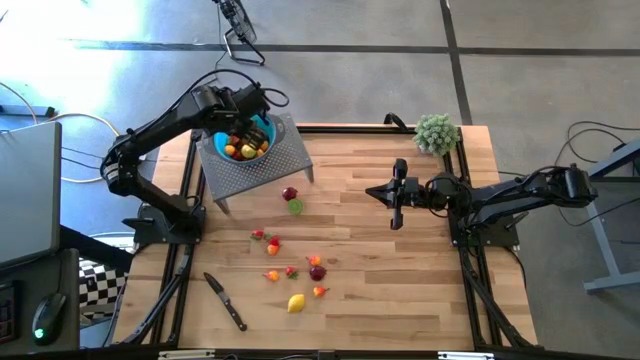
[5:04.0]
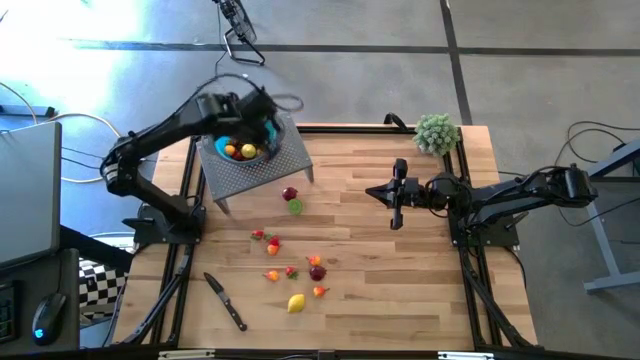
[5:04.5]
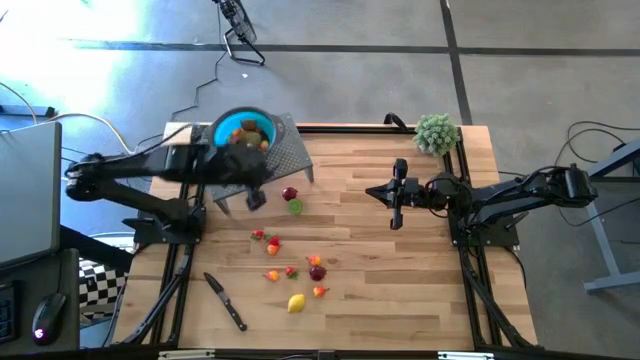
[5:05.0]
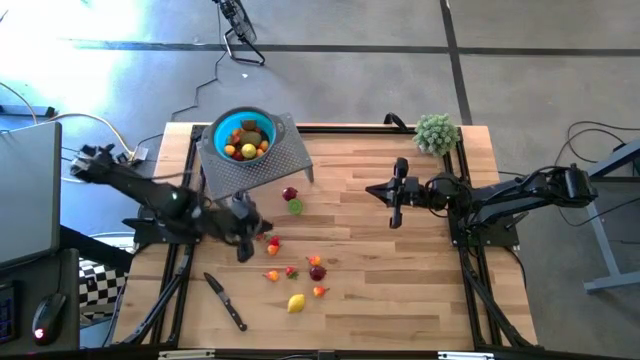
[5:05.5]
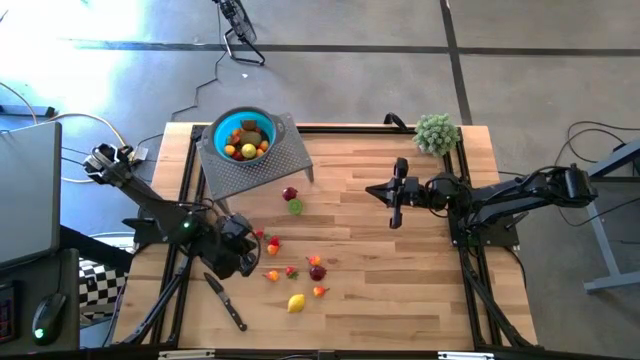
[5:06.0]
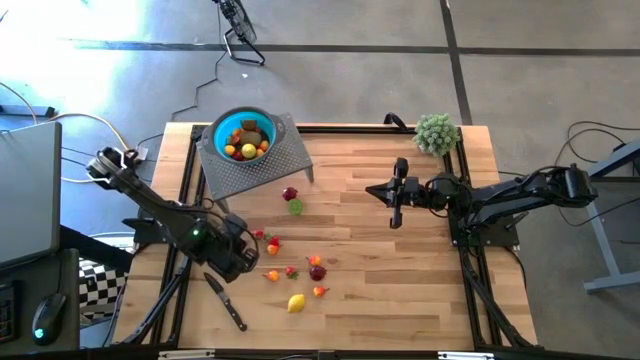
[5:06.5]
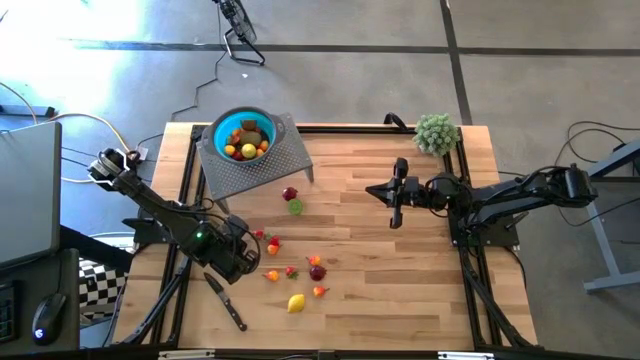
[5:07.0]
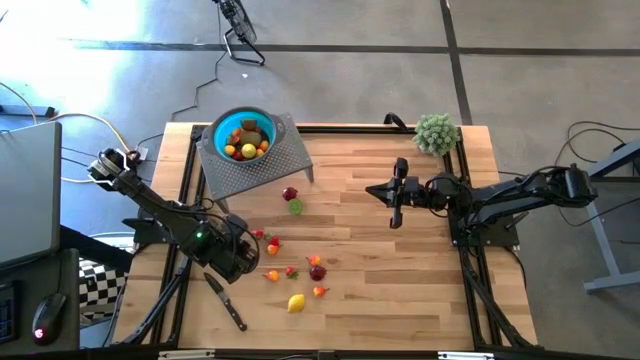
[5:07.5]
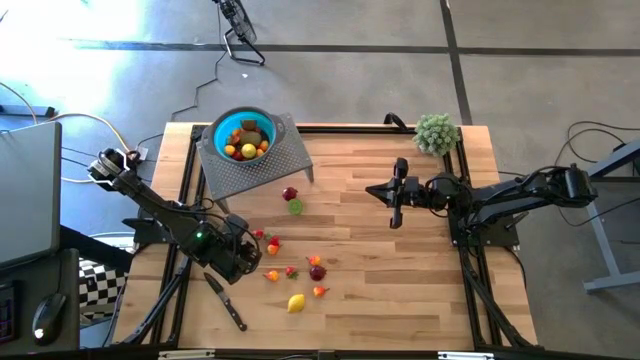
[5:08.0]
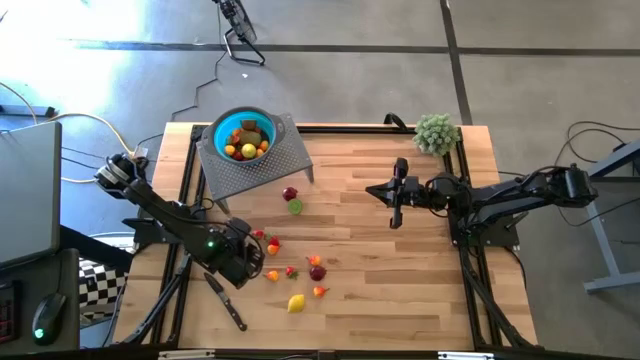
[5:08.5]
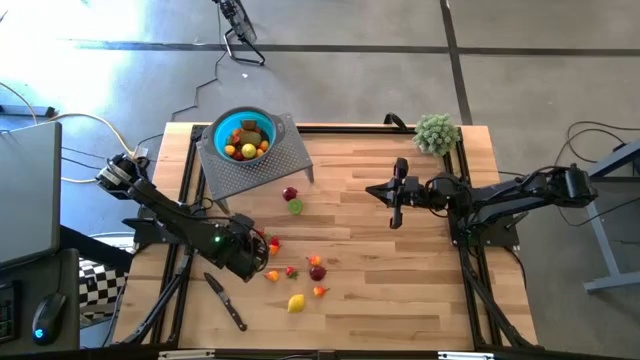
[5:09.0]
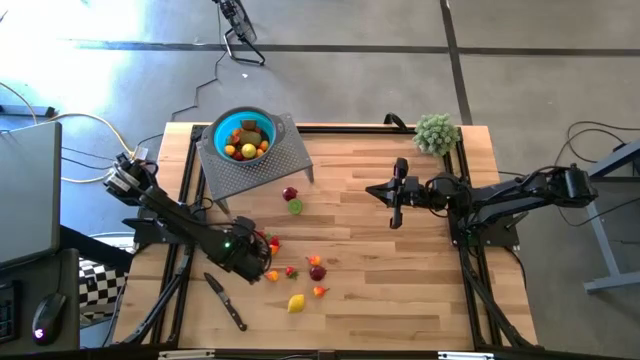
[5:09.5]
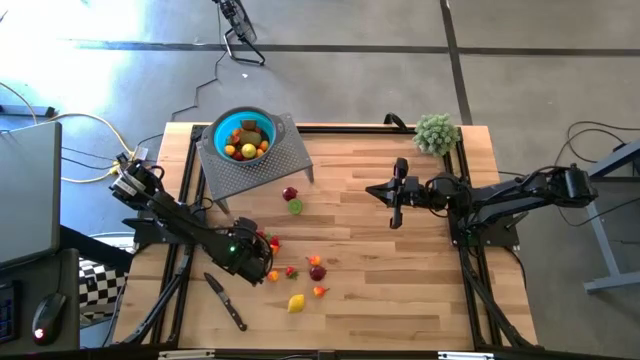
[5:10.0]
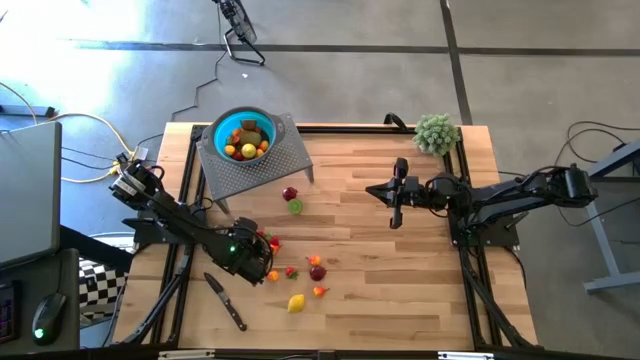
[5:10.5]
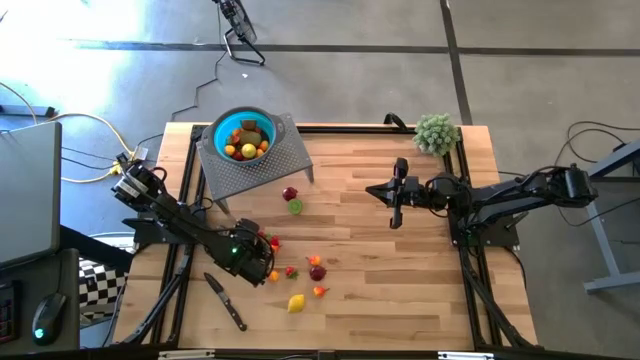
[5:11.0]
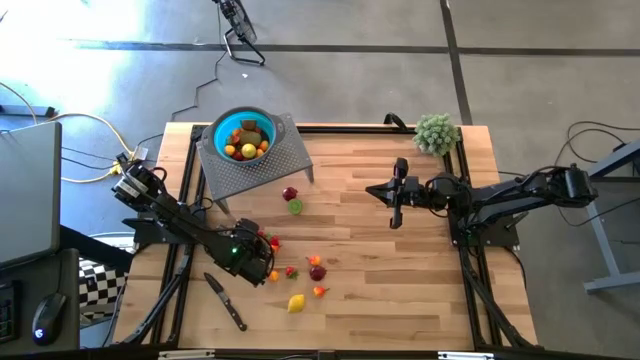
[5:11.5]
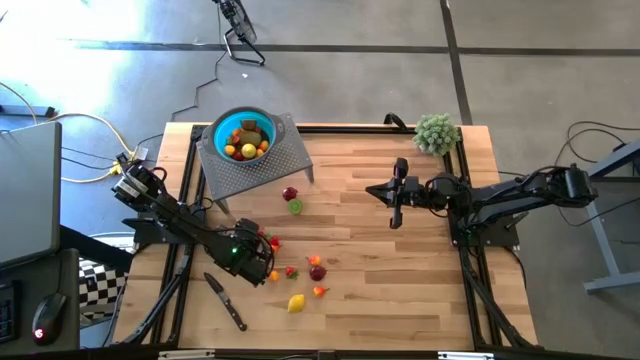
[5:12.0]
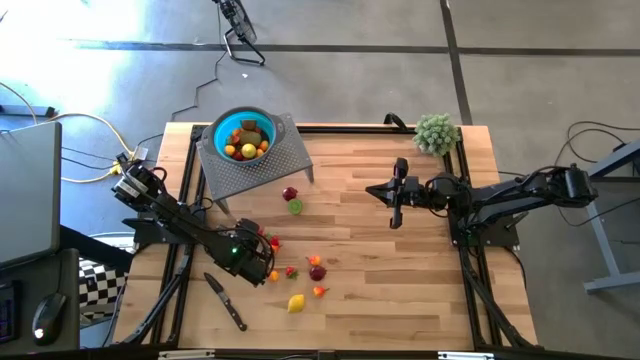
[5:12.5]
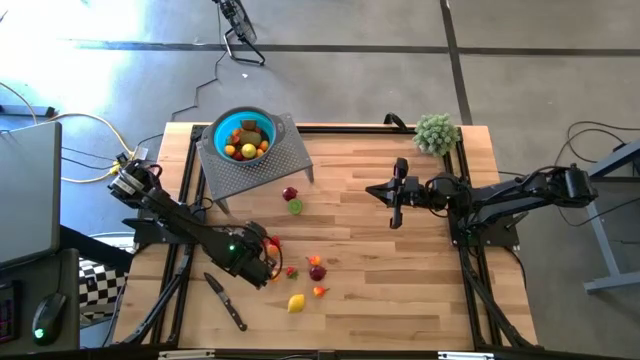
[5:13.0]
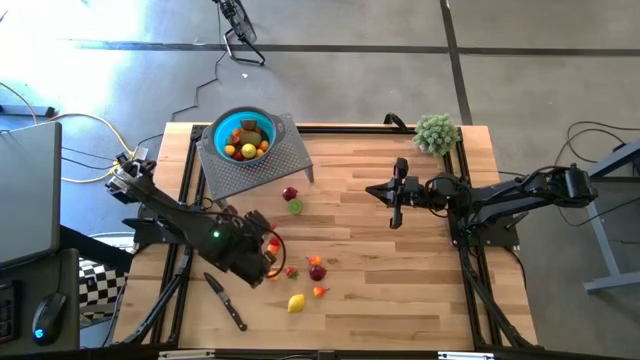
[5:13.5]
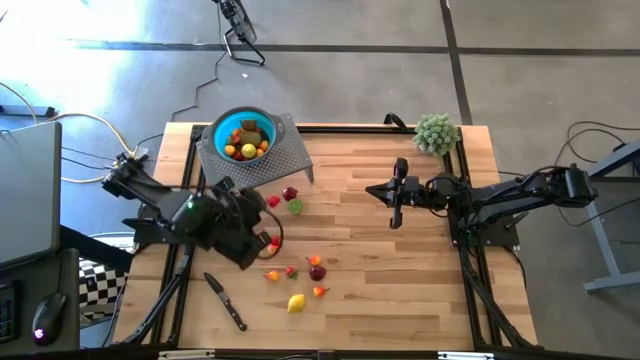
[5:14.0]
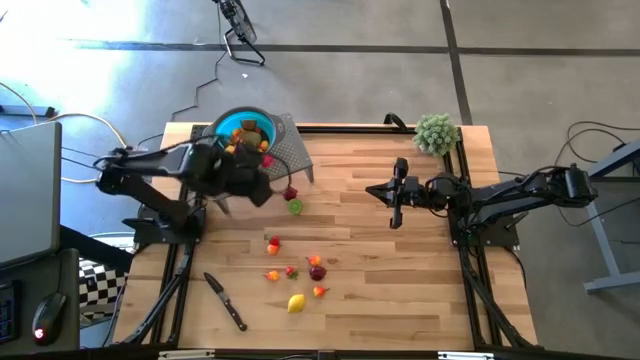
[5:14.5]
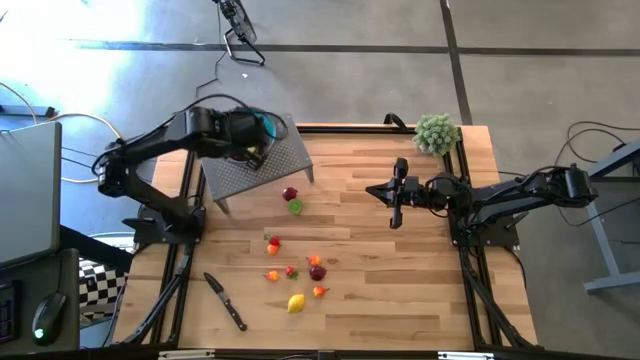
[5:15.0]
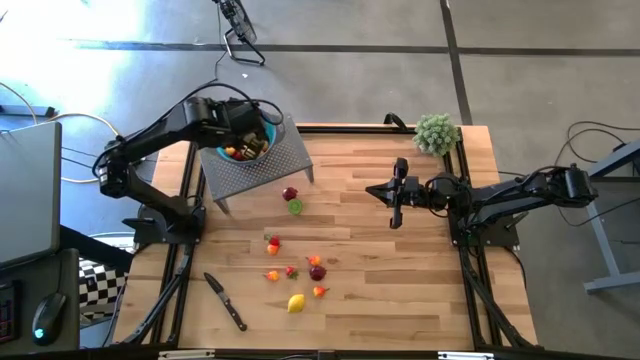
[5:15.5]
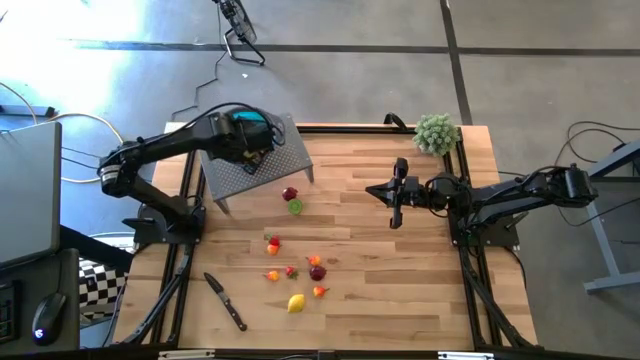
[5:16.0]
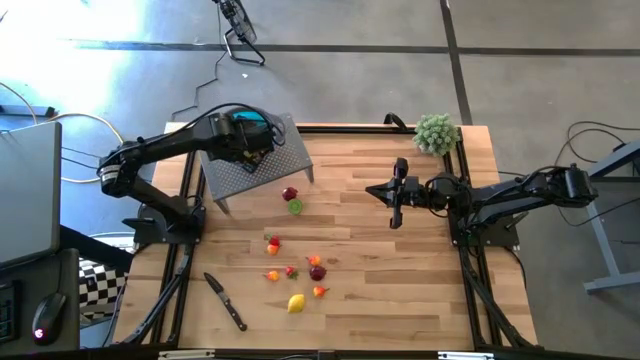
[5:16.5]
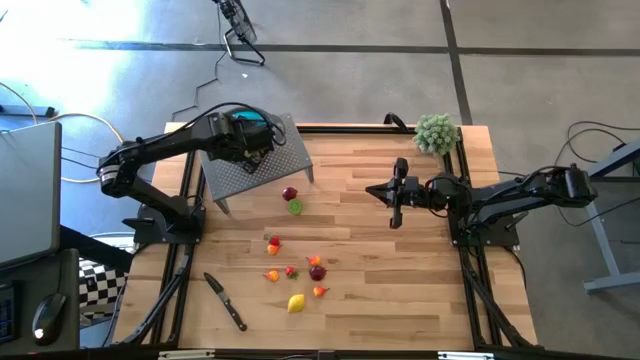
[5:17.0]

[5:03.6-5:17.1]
Task: Pick & Place Fruit
Put the red strawberry into the blue strainer bowl on the shelf

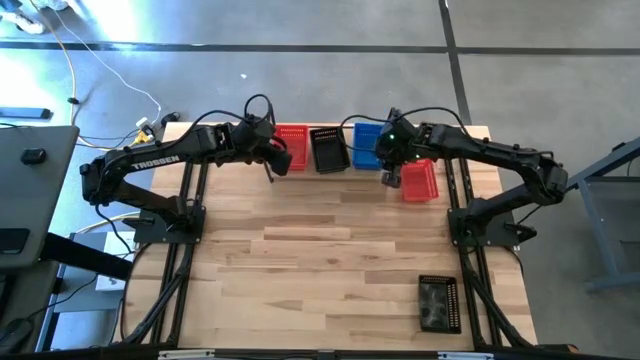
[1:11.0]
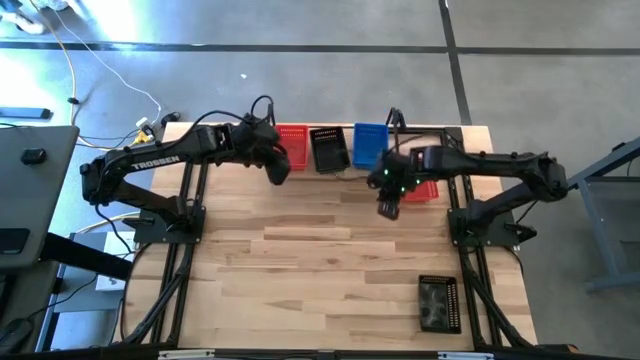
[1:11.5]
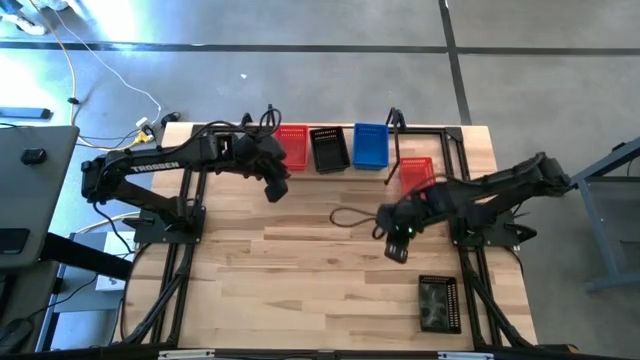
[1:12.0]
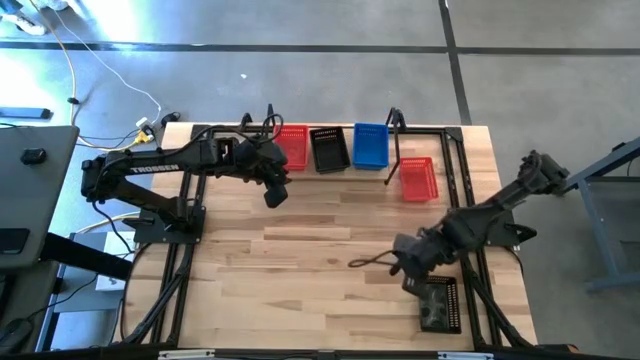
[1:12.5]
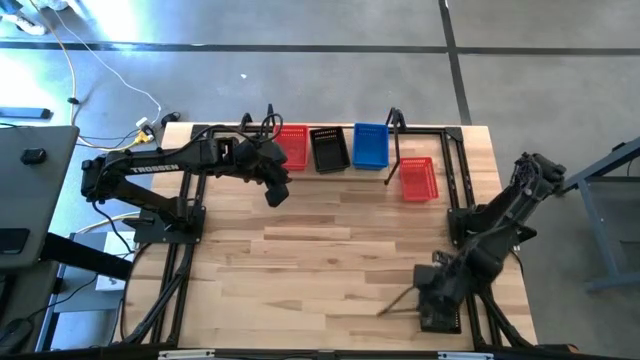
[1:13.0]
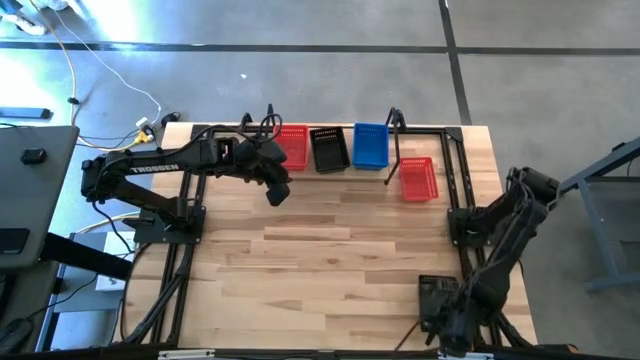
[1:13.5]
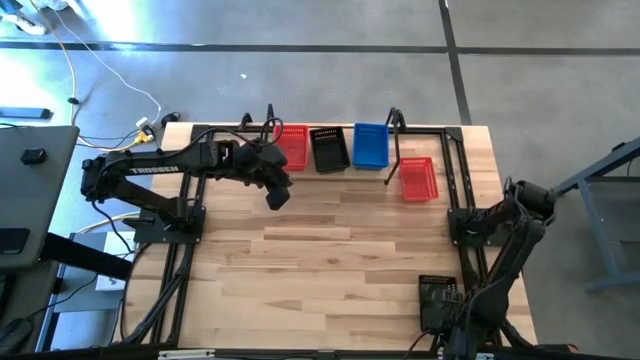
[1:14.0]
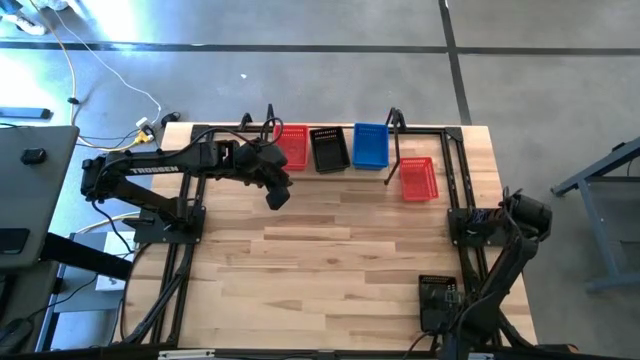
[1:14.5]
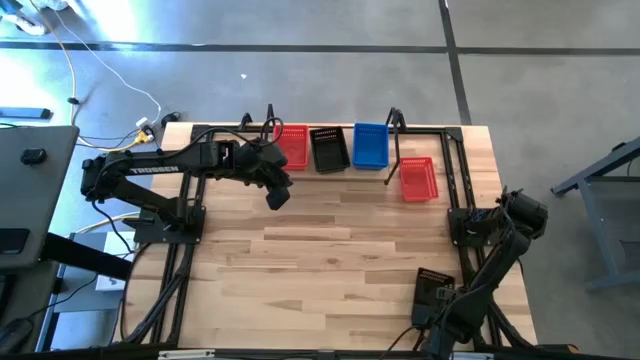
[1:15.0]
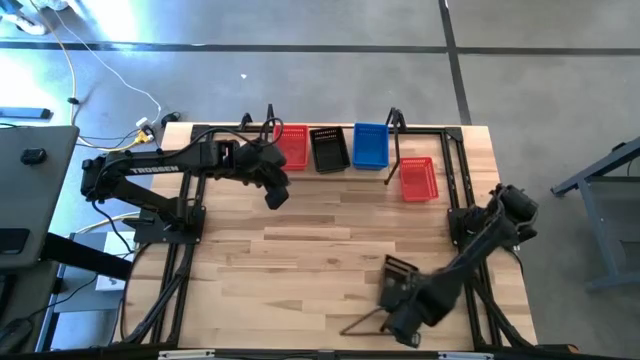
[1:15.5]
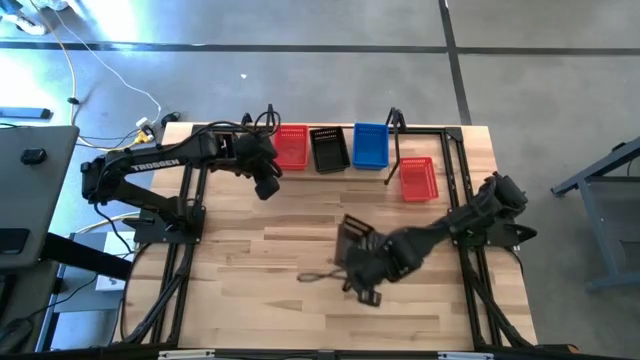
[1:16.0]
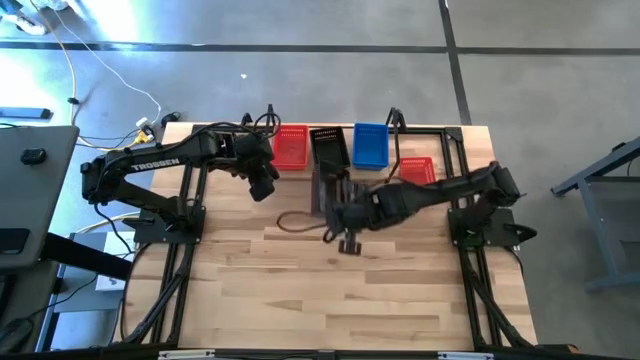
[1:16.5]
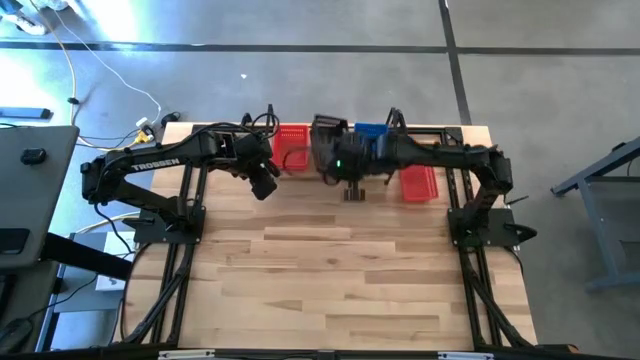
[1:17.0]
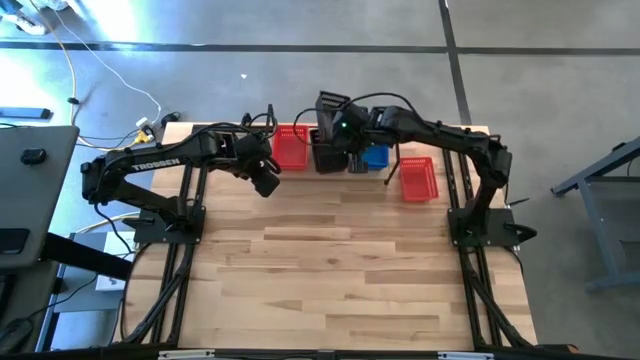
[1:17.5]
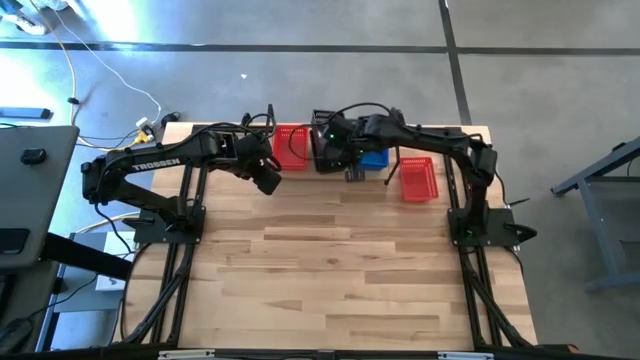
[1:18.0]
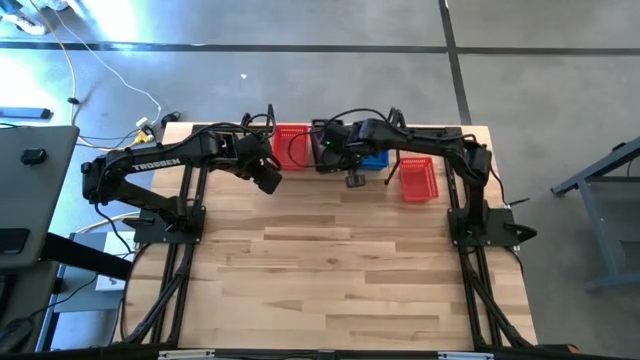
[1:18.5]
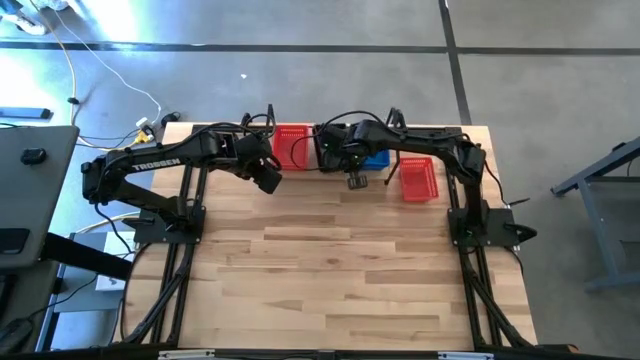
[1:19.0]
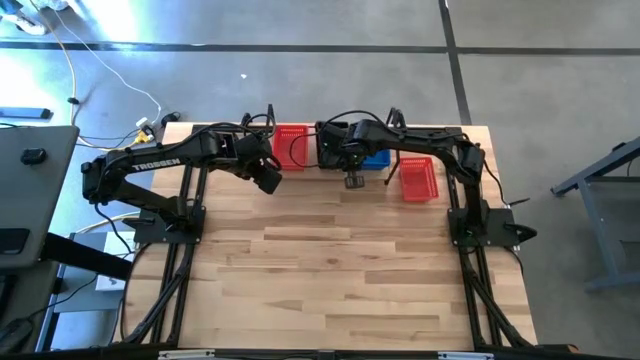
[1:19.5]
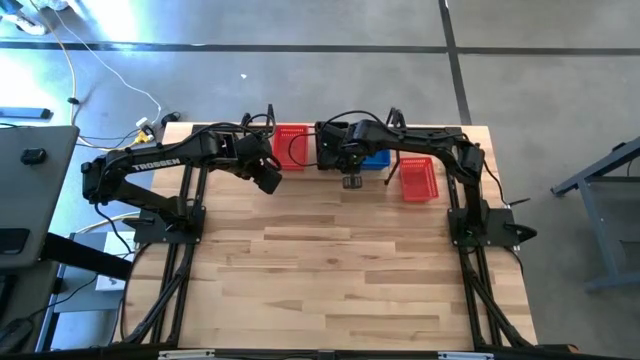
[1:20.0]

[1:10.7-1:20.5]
Task: Stack baskets on shelf by color
Stack the black basket on top of the black basket on the shelf
